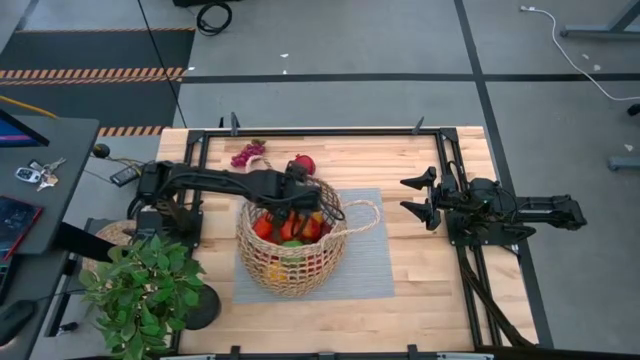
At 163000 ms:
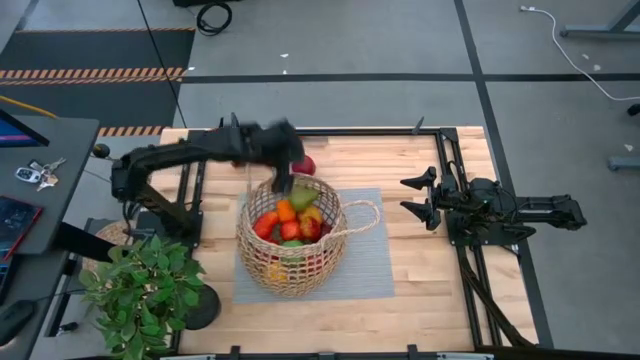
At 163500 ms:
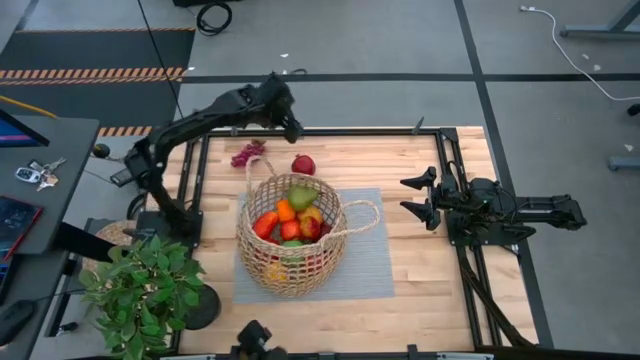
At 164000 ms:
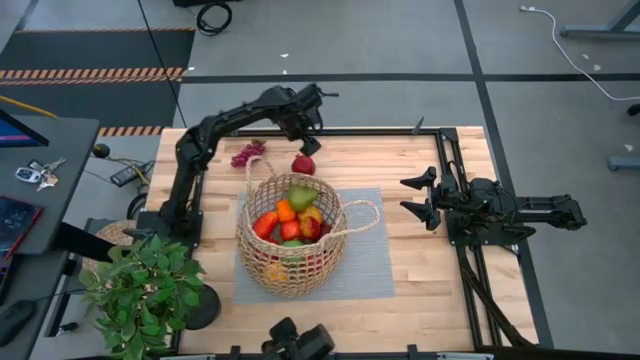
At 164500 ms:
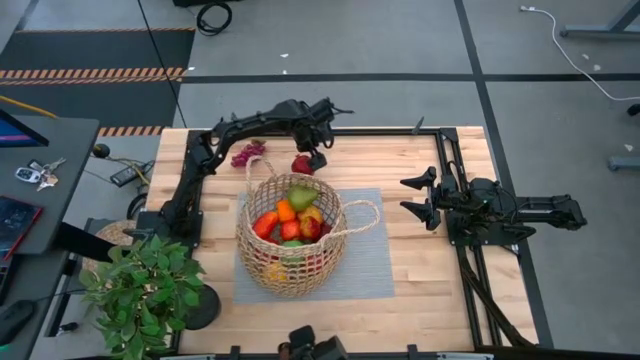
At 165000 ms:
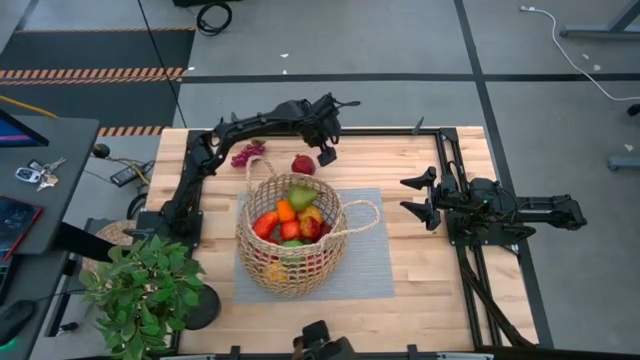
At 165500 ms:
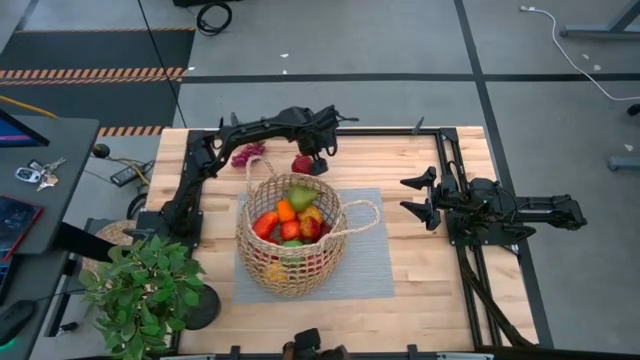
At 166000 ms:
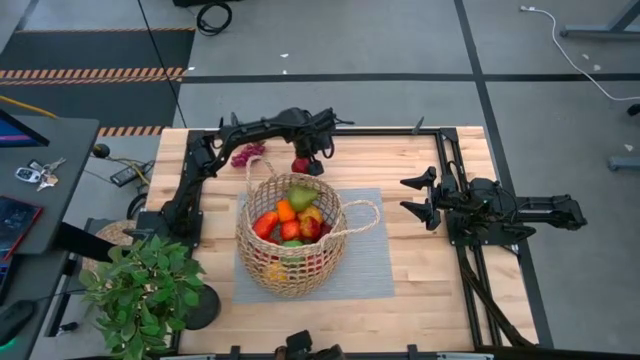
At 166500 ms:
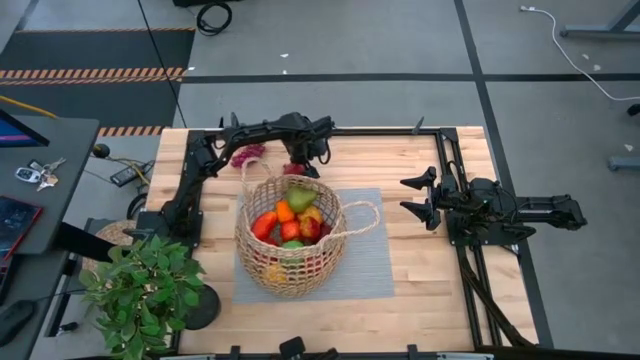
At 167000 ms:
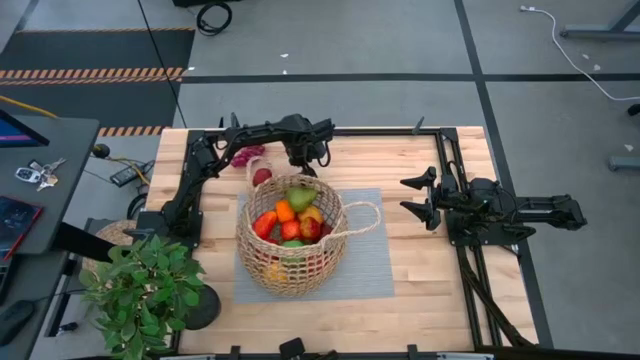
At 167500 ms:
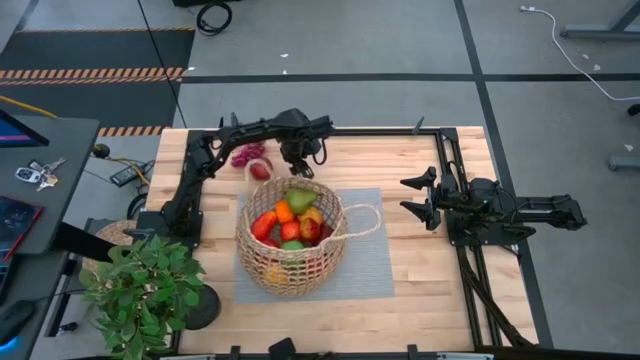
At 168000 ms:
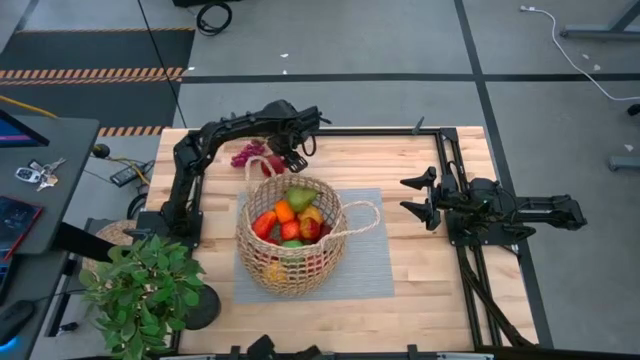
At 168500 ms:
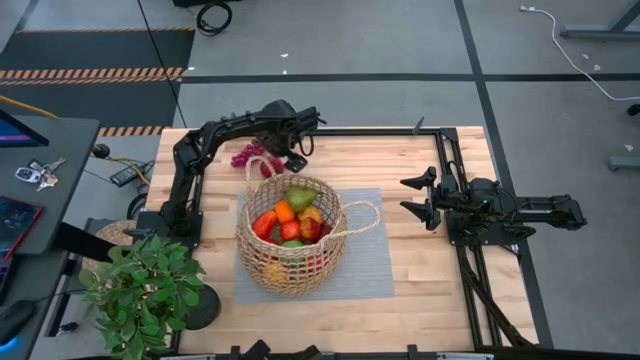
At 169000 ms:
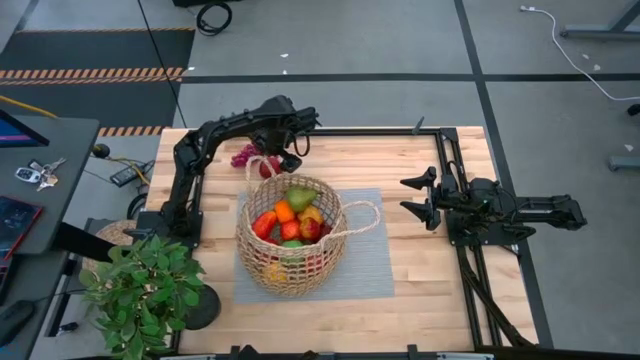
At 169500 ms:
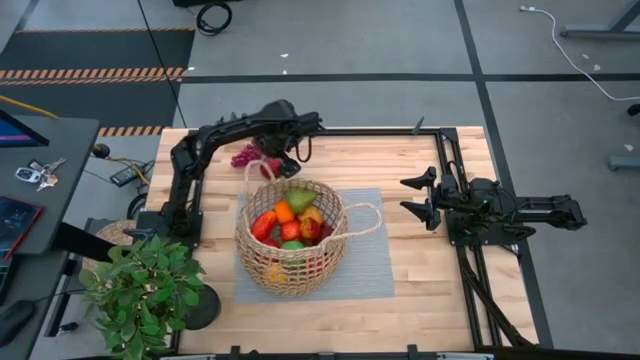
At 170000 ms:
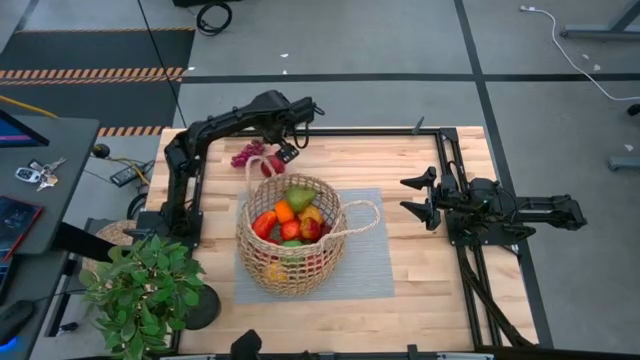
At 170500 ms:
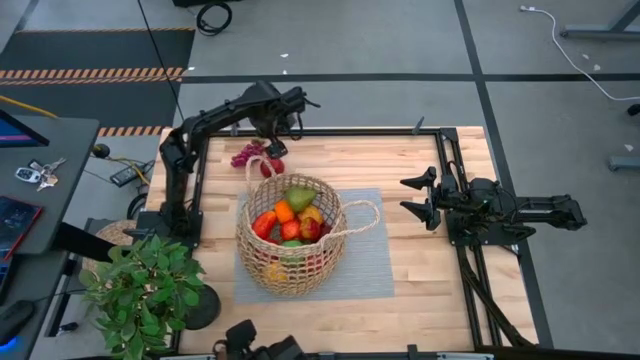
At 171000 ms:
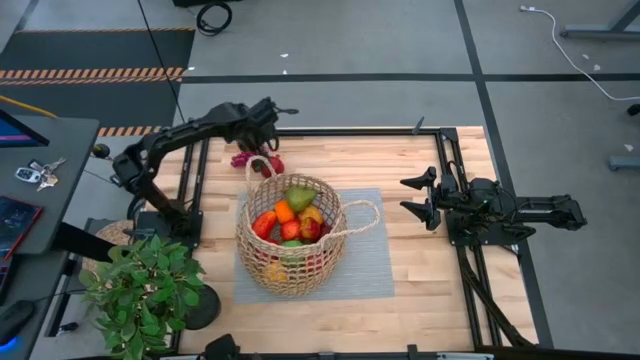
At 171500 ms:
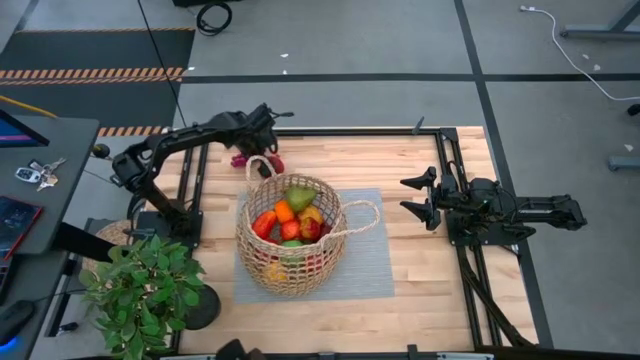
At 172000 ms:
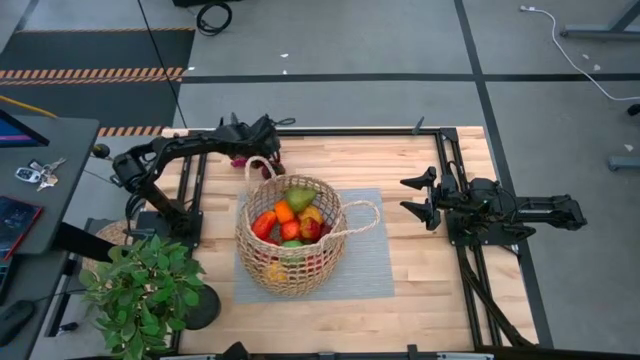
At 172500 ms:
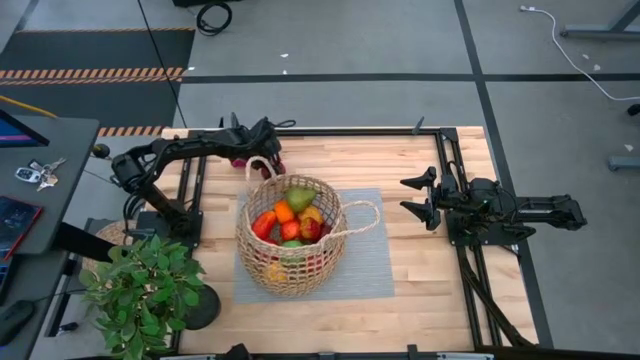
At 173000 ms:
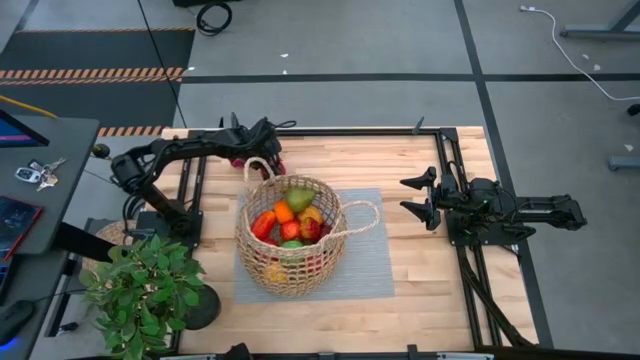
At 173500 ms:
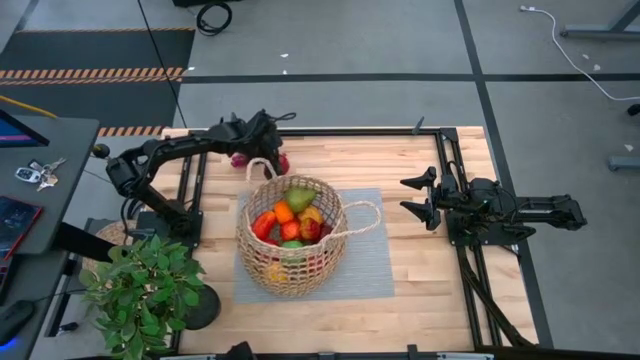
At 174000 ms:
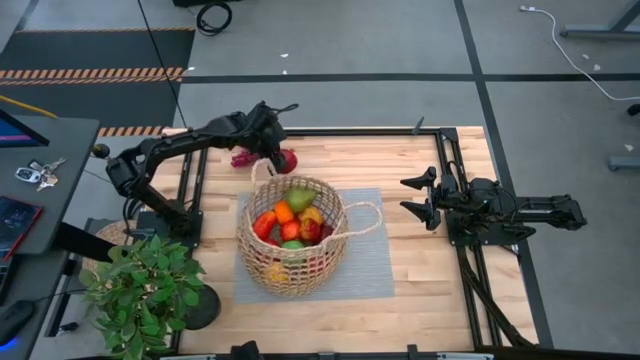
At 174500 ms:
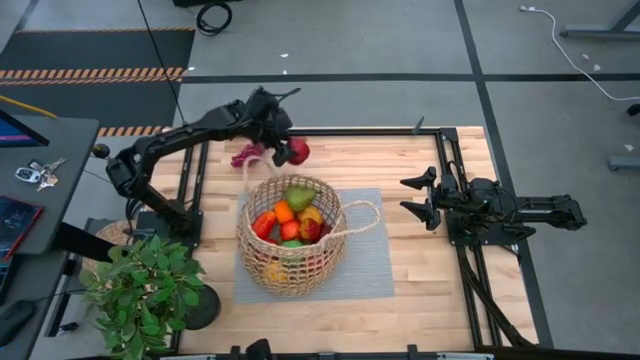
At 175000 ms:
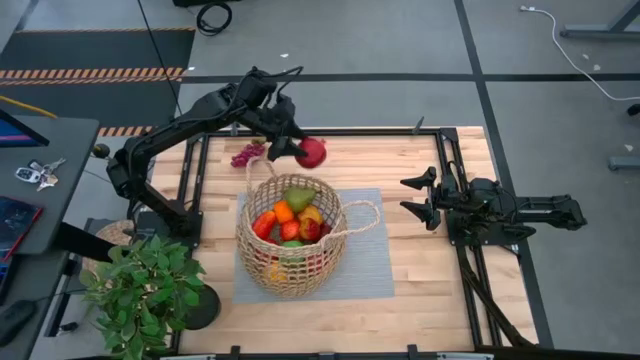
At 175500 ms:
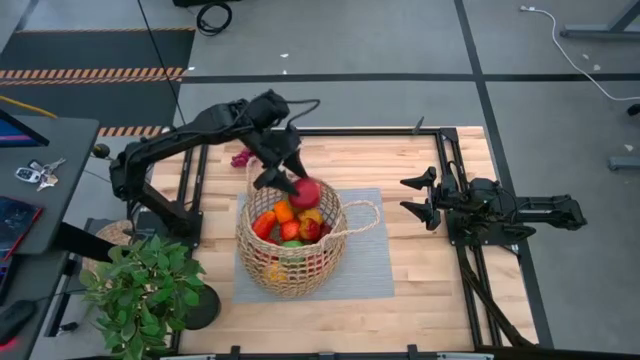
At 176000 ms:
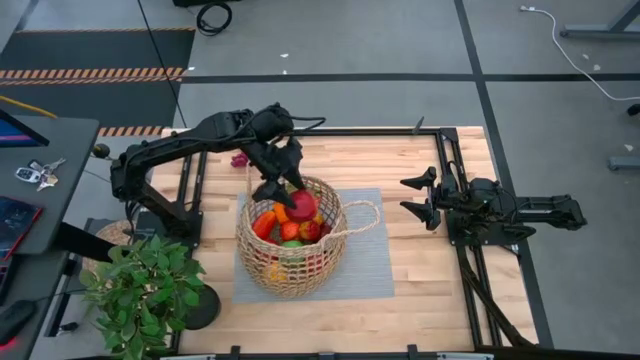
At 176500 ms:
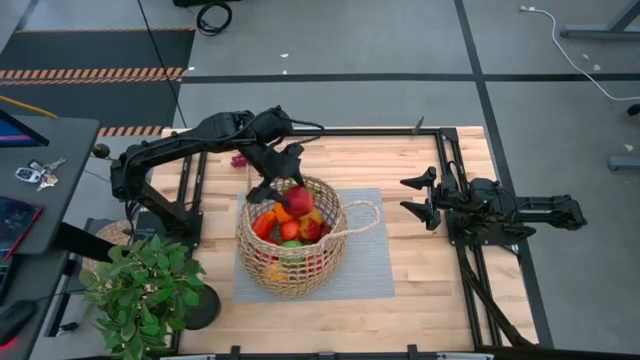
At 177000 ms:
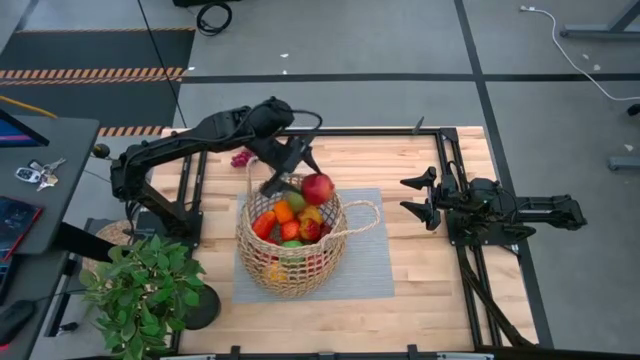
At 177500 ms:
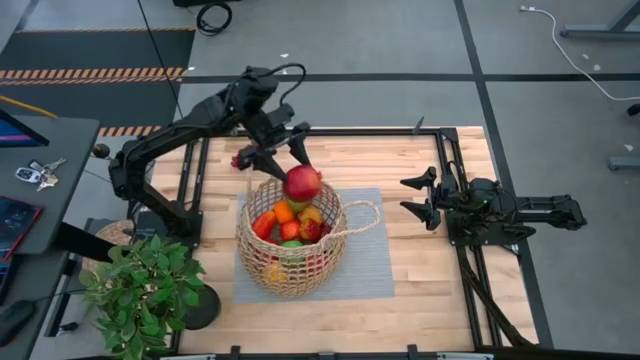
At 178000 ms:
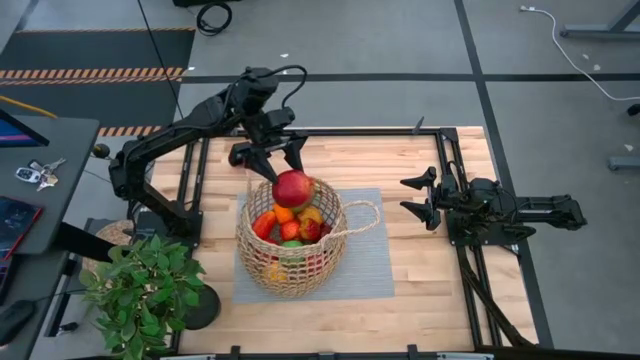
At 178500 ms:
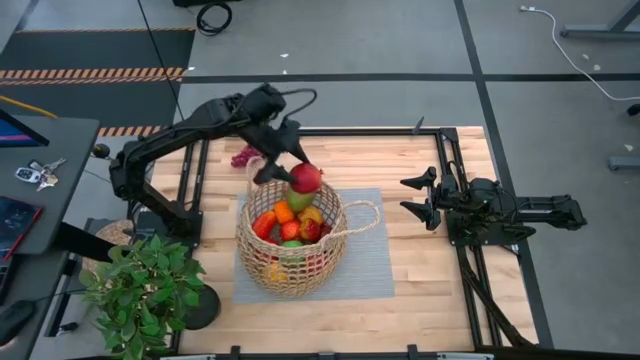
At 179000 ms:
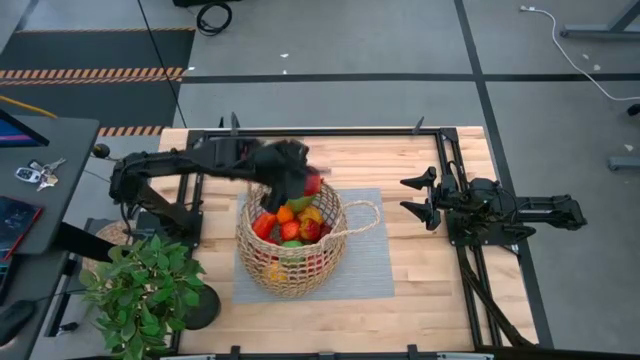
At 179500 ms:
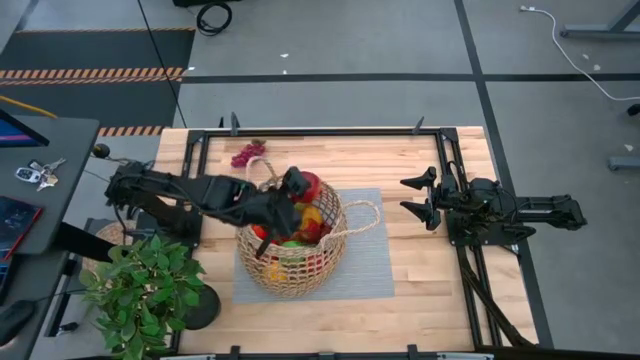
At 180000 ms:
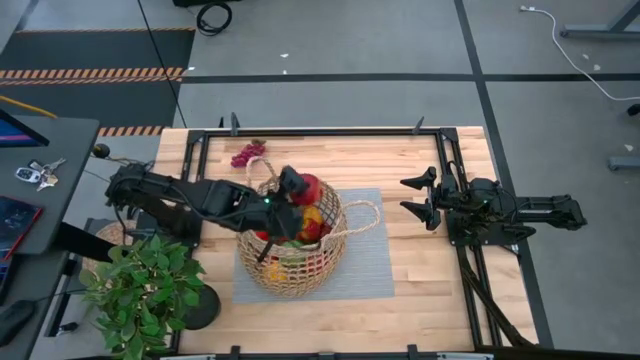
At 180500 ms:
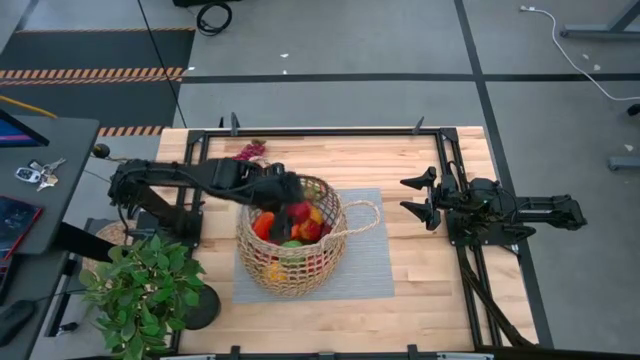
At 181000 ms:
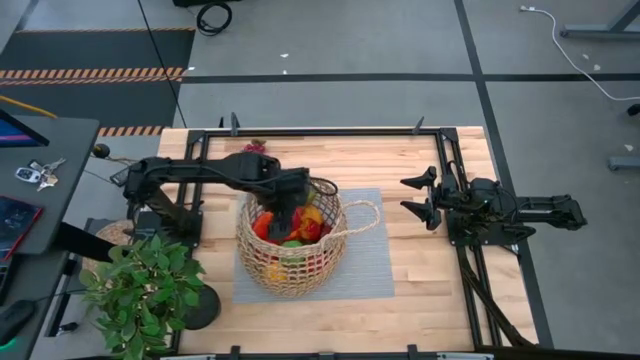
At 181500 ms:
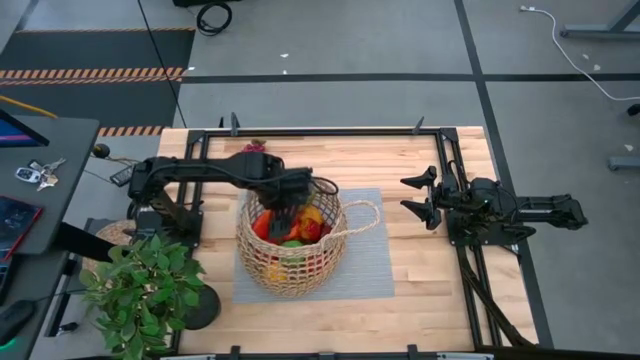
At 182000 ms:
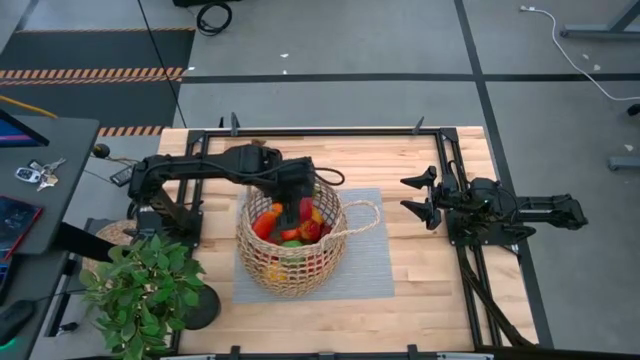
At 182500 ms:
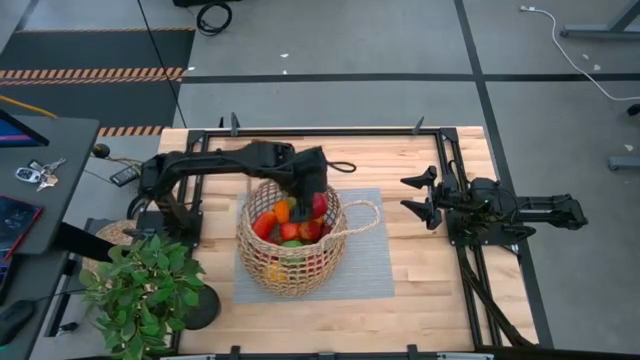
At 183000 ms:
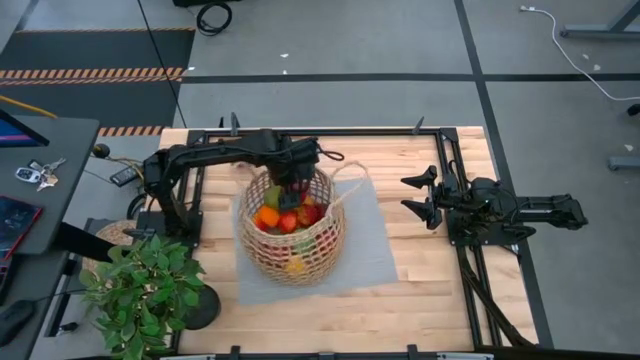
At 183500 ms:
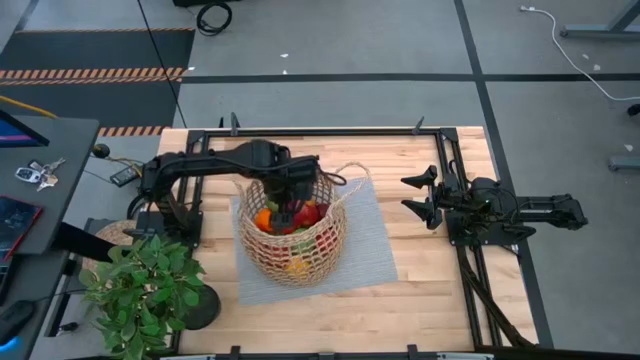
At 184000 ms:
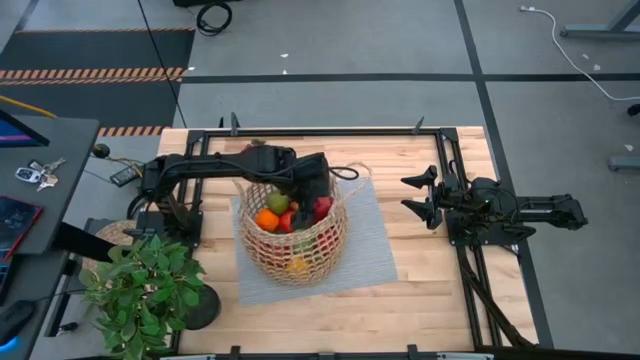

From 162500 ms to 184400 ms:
Task: Build produce basket
Put the red pomegranate into the brown woven basket
